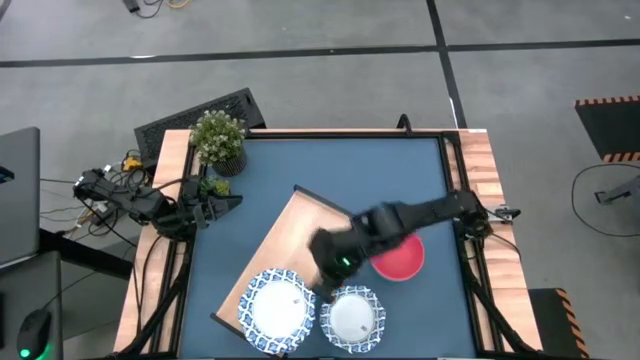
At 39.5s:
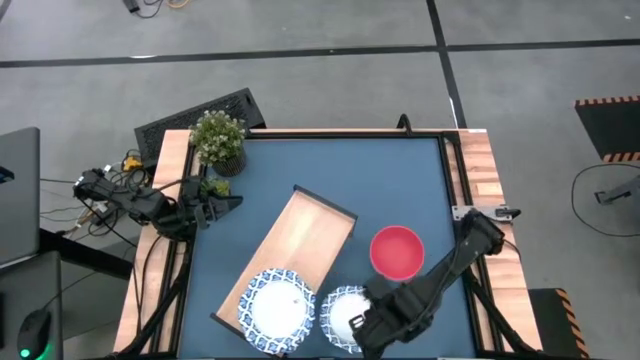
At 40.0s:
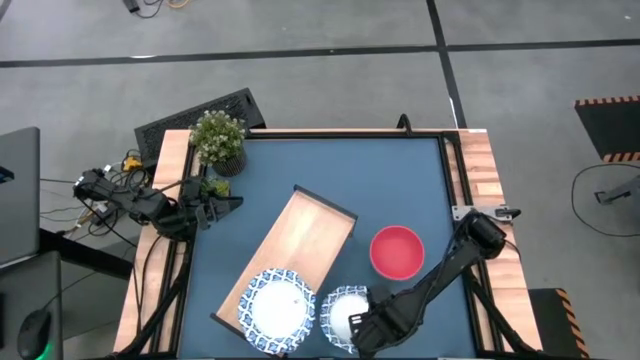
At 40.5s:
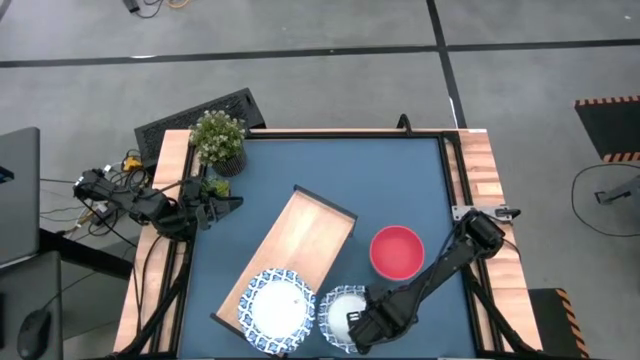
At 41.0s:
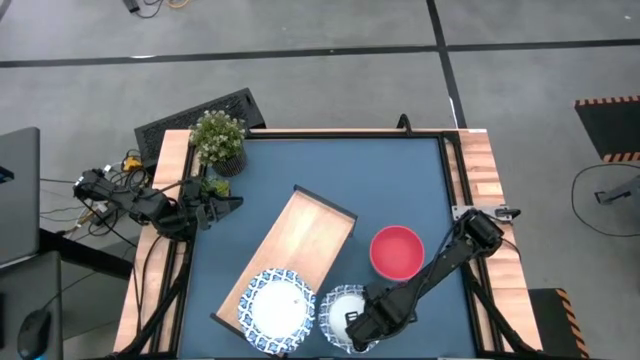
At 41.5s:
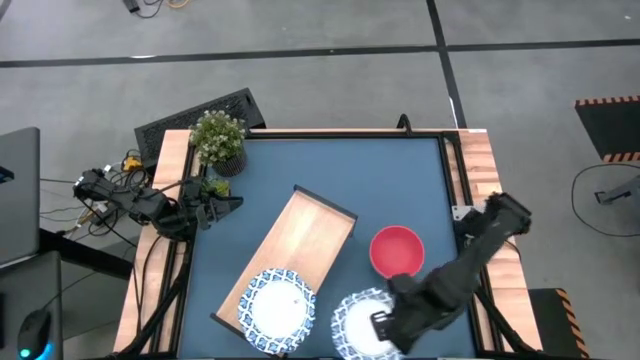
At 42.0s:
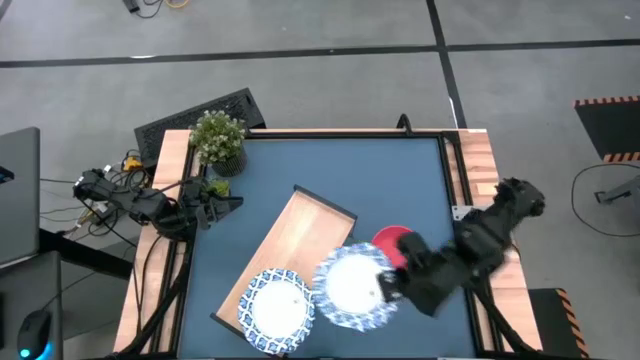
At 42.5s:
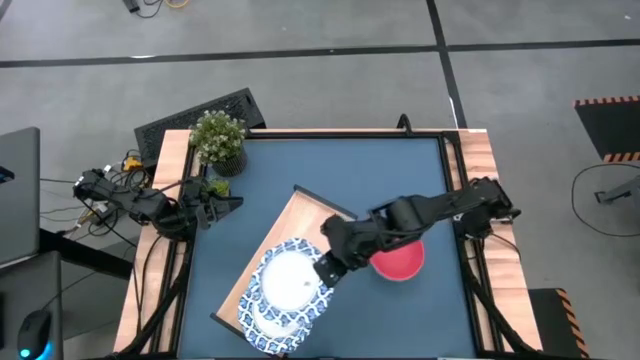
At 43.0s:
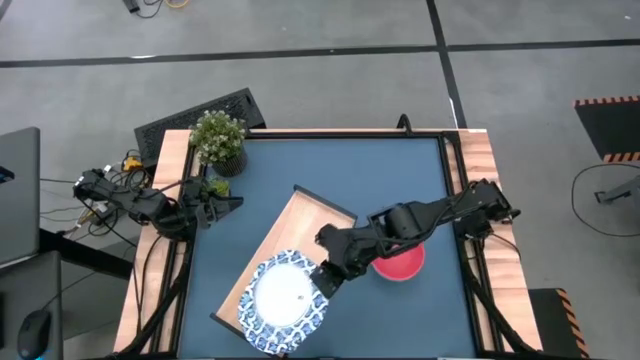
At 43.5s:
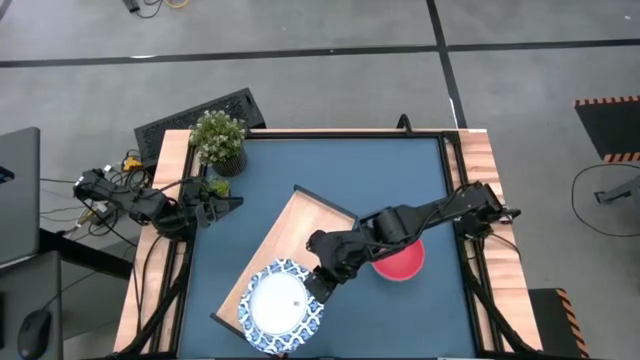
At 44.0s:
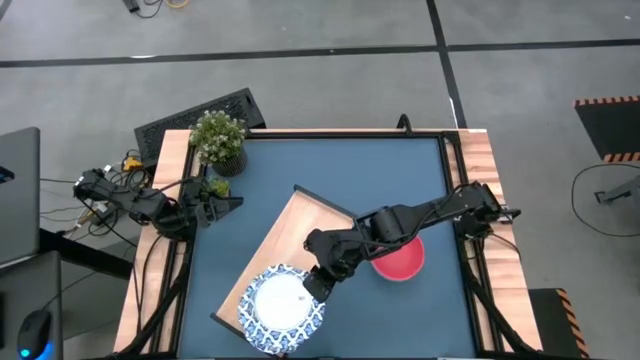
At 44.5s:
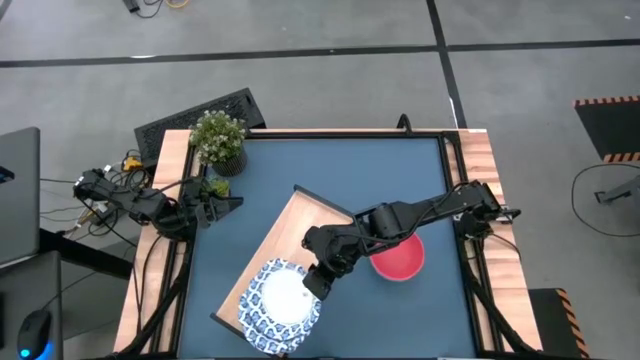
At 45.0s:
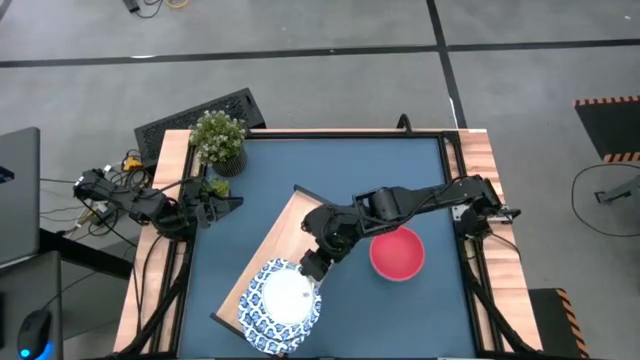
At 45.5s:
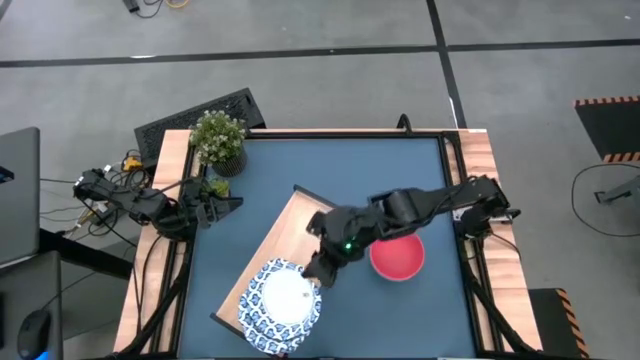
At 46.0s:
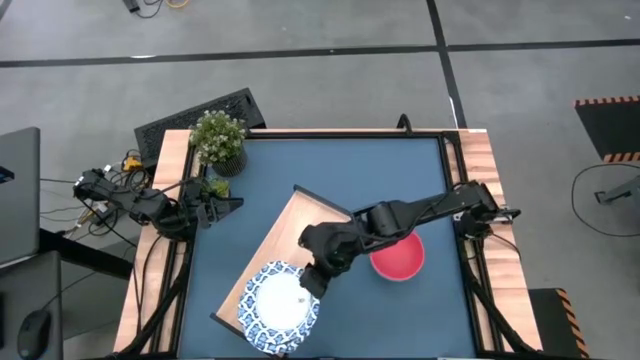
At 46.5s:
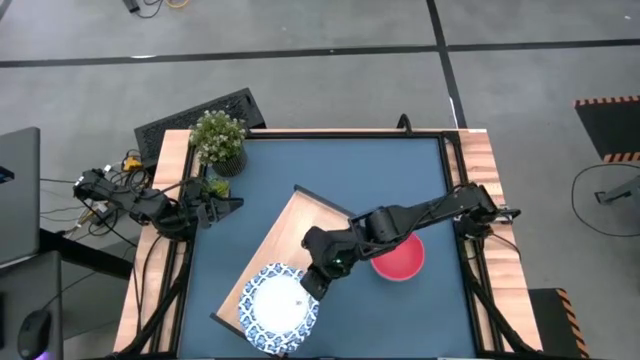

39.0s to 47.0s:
Task: Place and stack bowls onto a shelf
Stack the white bowl on top of the other white bowl on the shelf

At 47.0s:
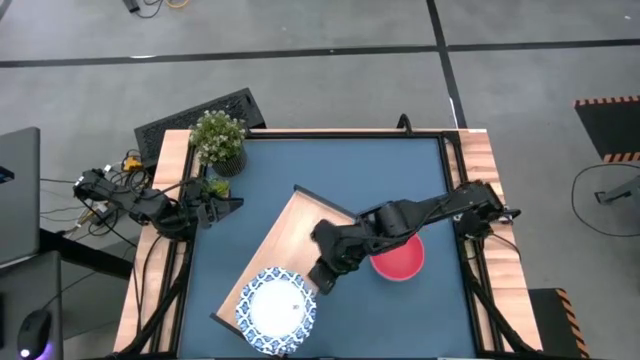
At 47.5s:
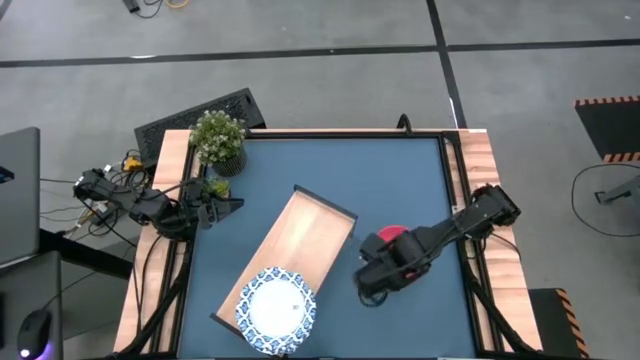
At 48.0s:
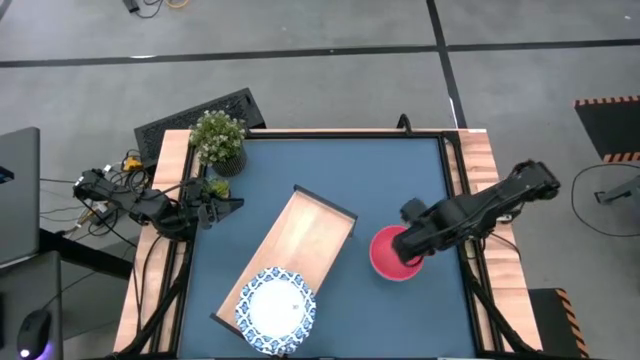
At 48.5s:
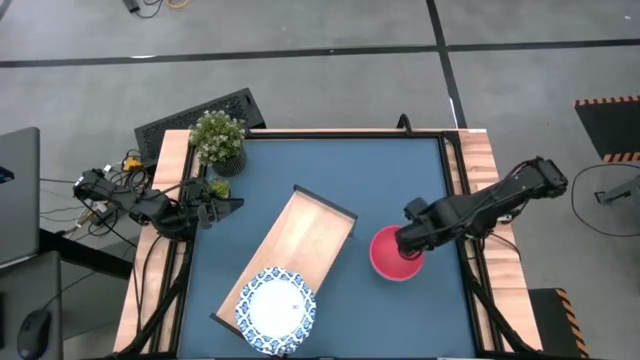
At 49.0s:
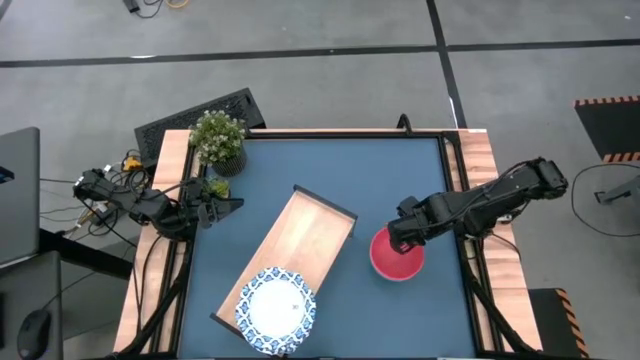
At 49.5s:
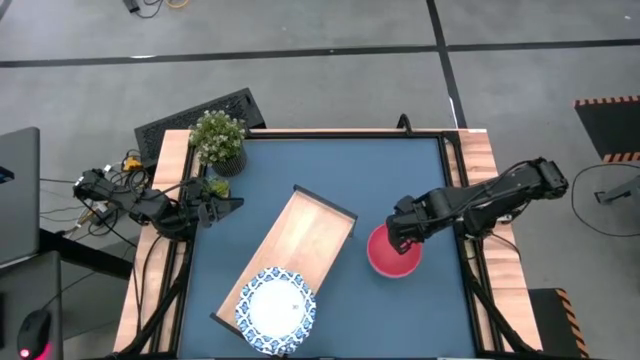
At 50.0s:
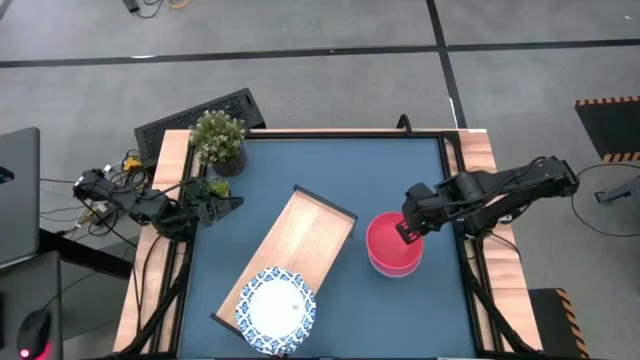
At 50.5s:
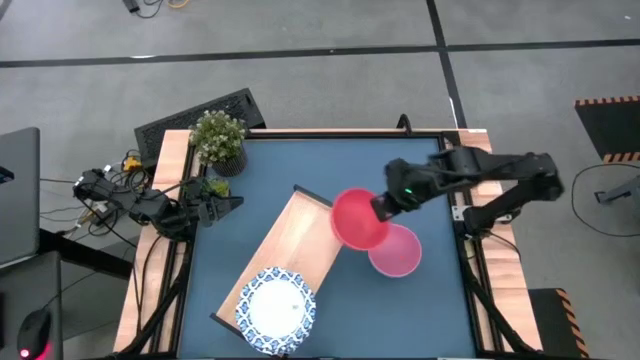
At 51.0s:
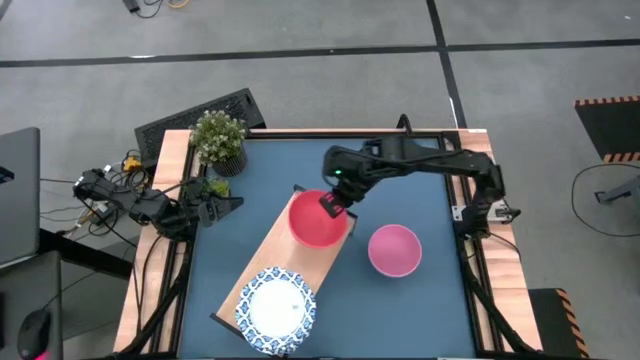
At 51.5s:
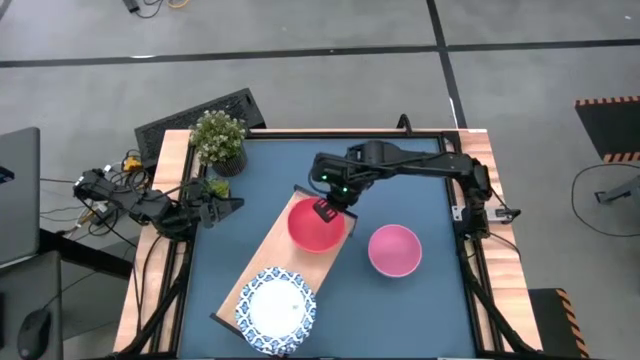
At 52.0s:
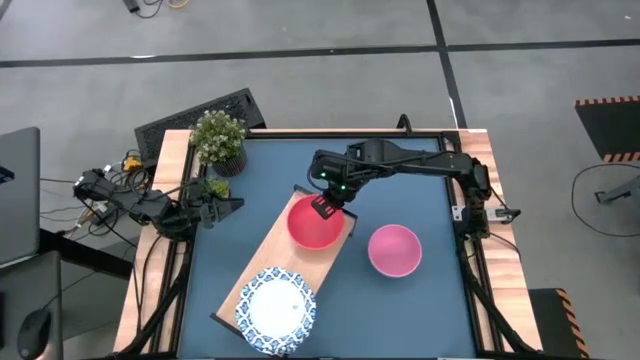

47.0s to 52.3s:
Put the orange bowl on the shelf

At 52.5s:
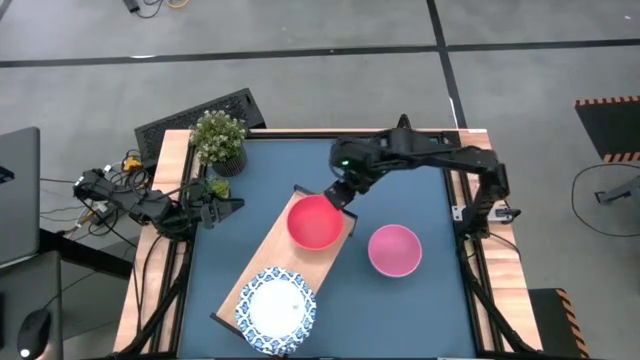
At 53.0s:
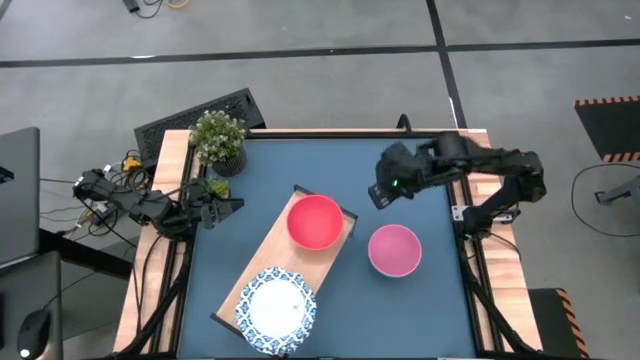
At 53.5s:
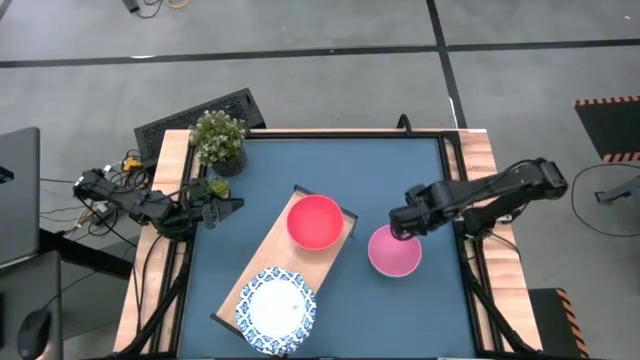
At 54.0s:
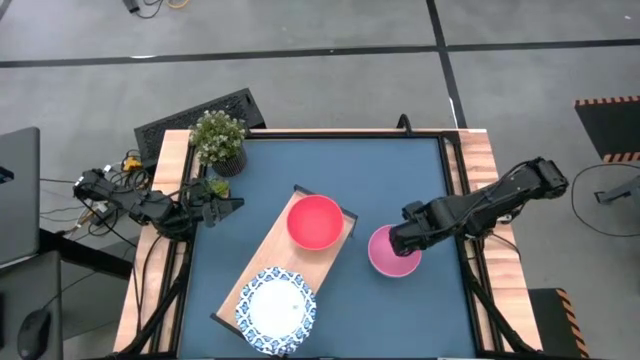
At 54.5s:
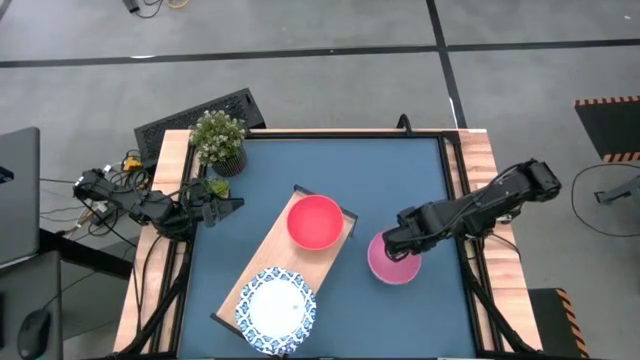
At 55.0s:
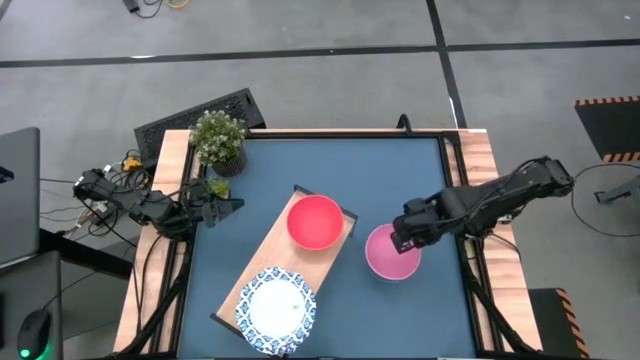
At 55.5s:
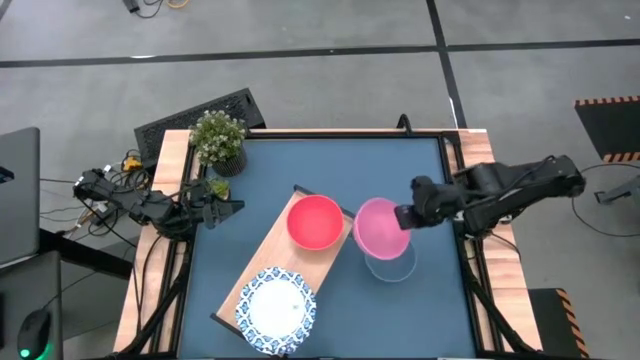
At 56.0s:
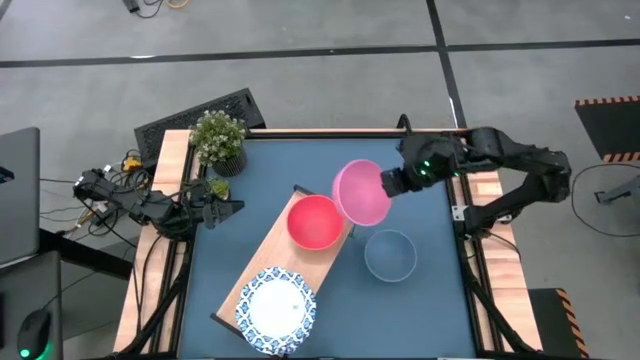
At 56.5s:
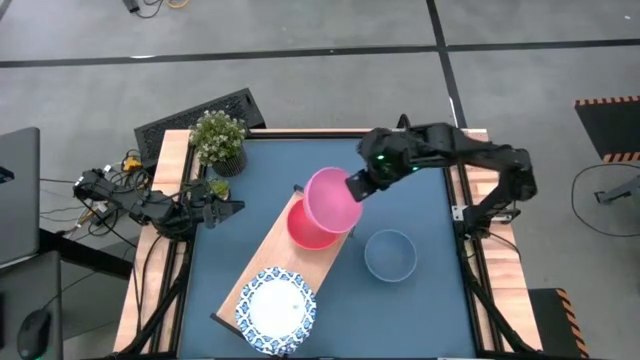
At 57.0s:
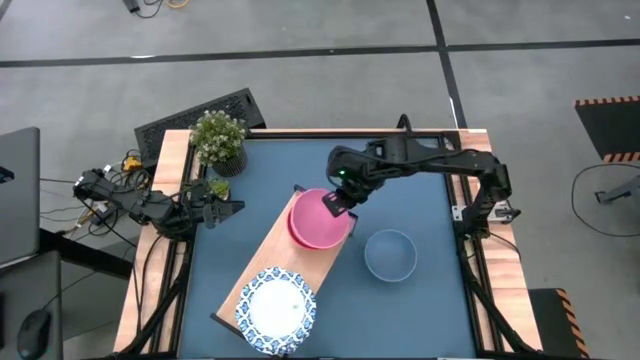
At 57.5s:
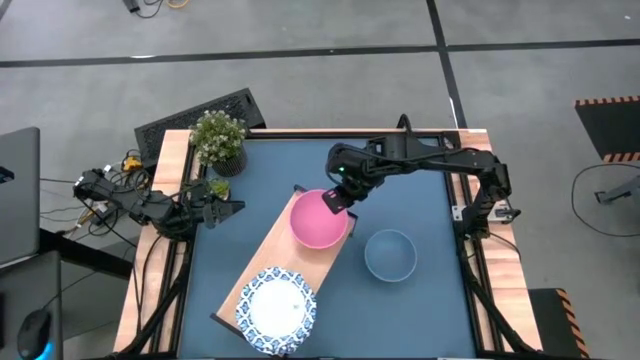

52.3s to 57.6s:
Stack the pink bowl on top of the orange bowl on the shelf

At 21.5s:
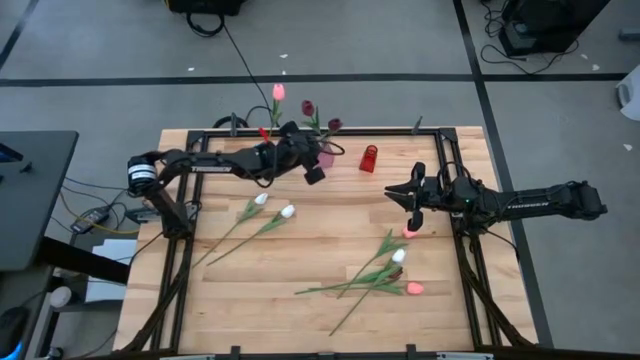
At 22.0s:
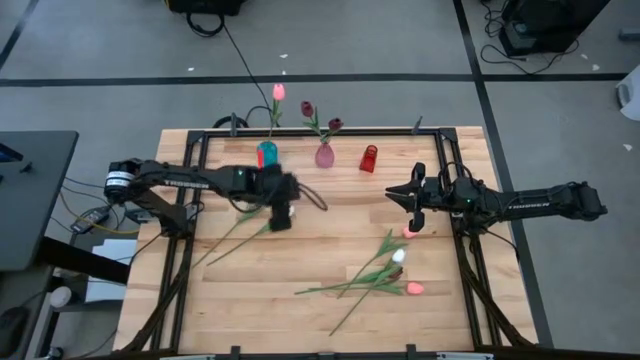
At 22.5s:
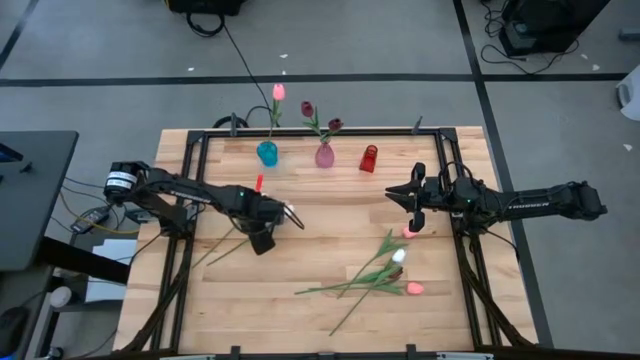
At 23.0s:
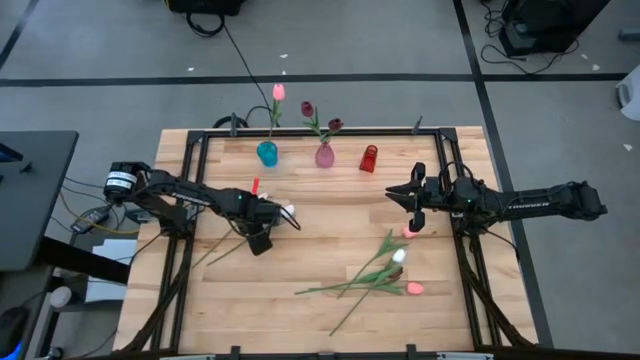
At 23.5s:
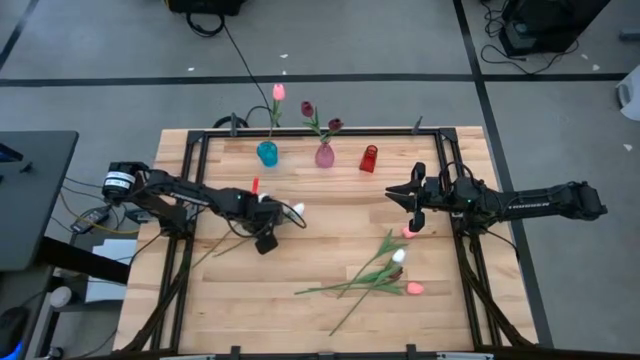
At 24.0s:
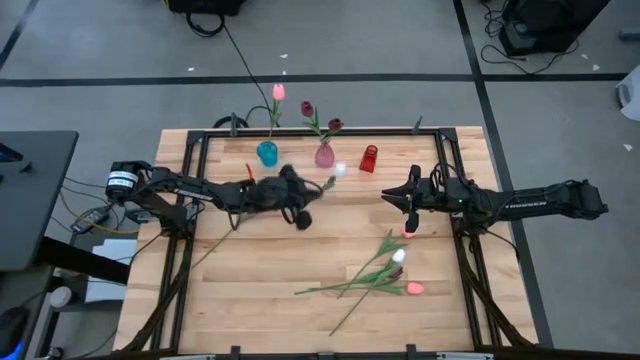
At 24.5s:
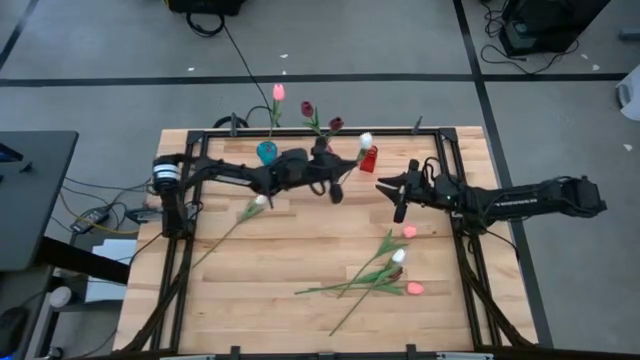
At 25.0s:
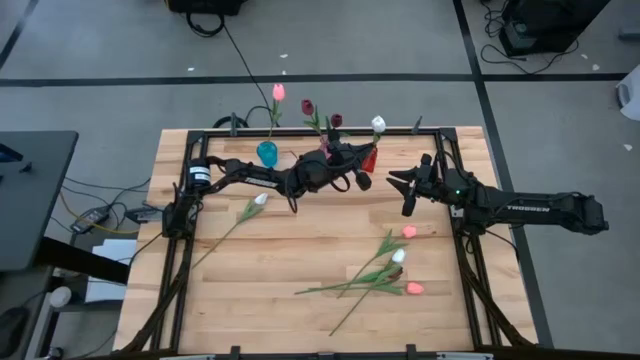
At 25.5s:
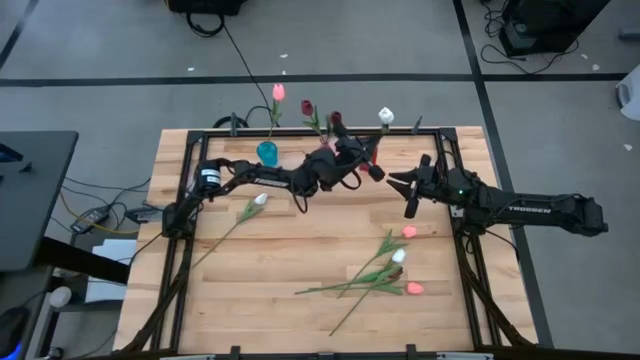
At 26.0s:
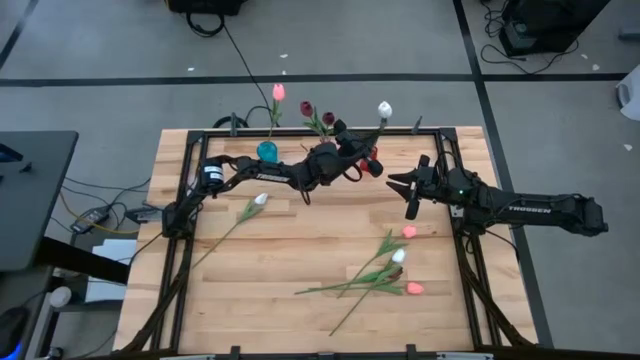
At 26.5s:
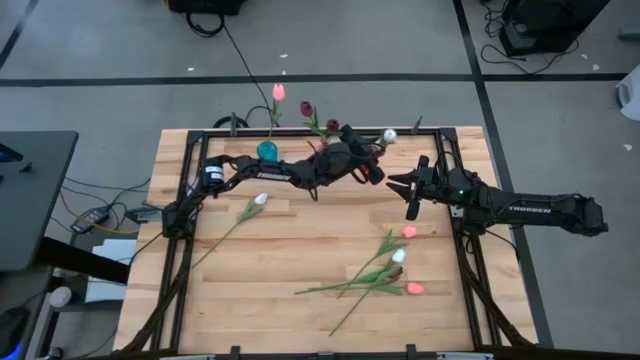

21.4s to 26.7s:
Task: Sort flowers into vase by color
Put the top right white flower into the red vase
